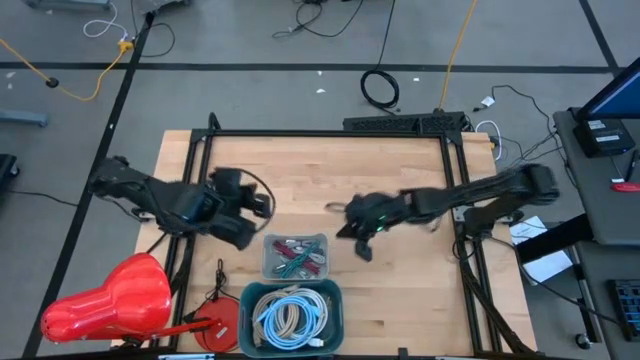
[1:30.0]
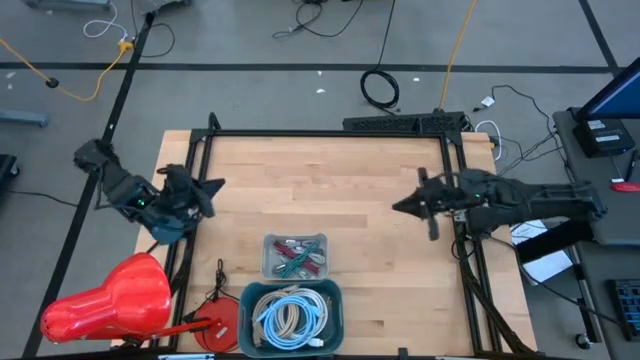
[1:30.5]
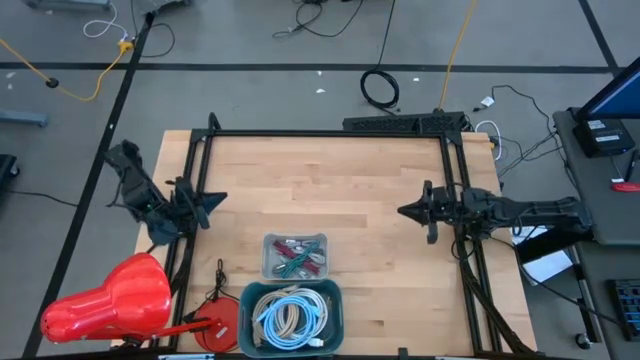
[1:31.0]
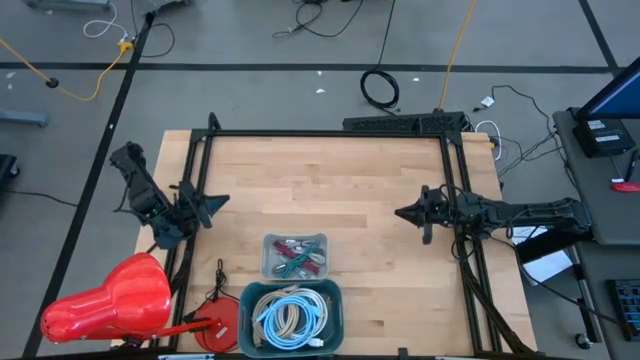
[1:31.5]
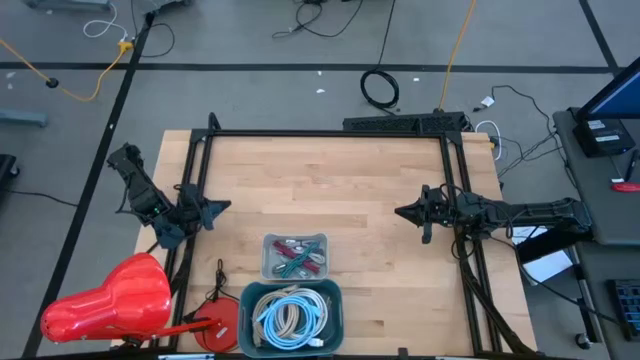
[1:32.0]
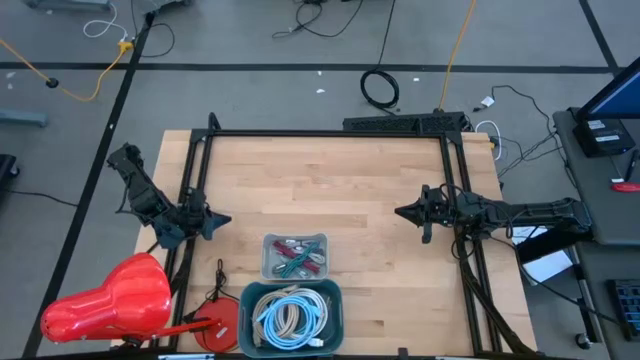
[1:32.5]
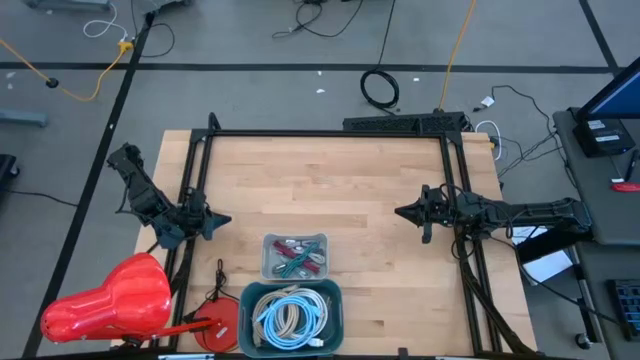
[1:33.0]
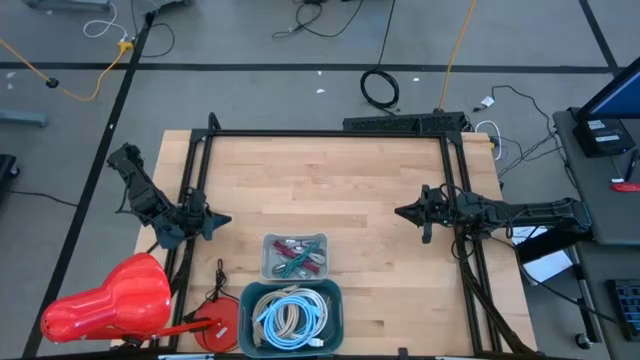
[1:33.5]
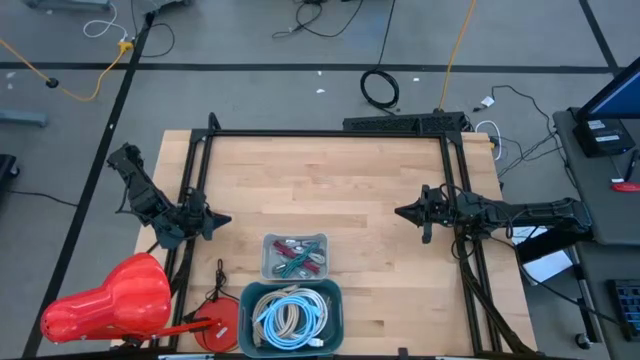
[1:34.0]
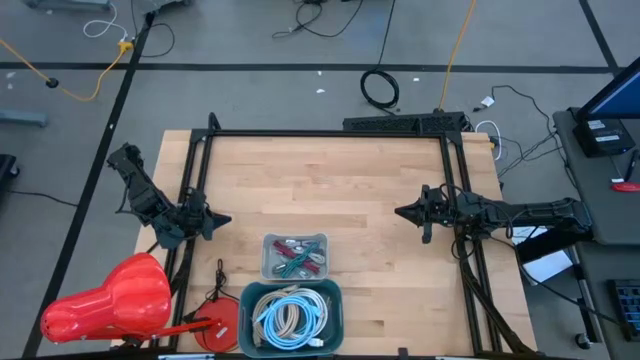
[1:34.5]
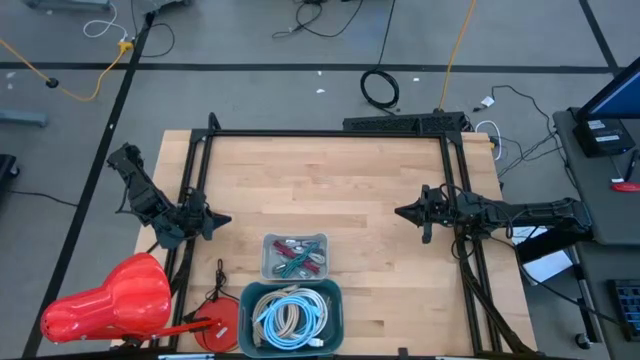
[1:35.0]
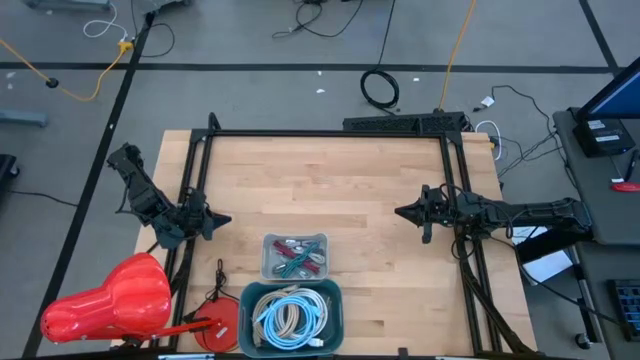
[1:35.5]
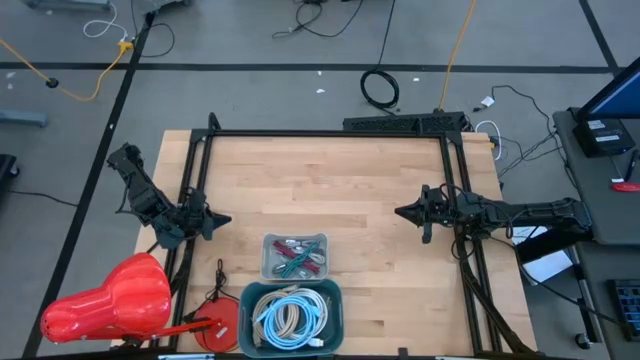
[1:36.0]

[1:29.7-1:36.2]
Task: Pick & Place USB Port
Return to Home Position

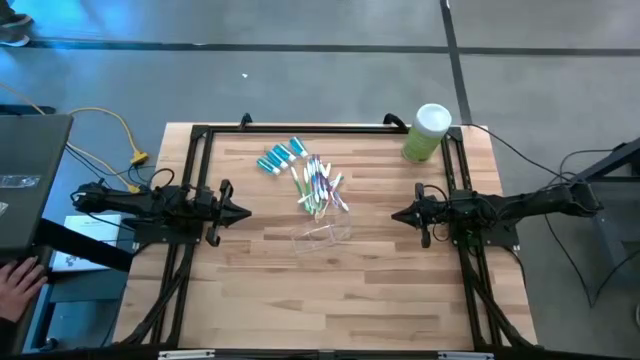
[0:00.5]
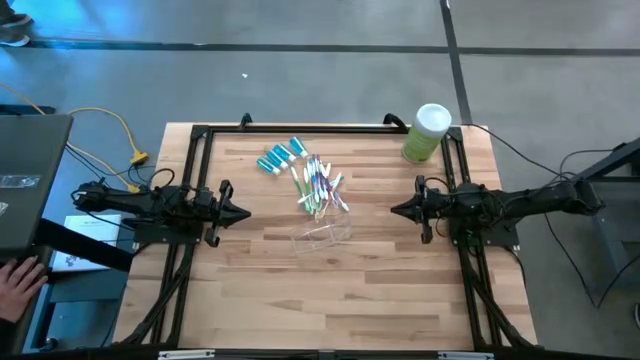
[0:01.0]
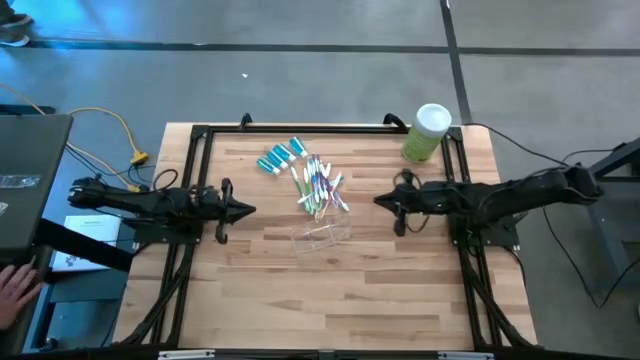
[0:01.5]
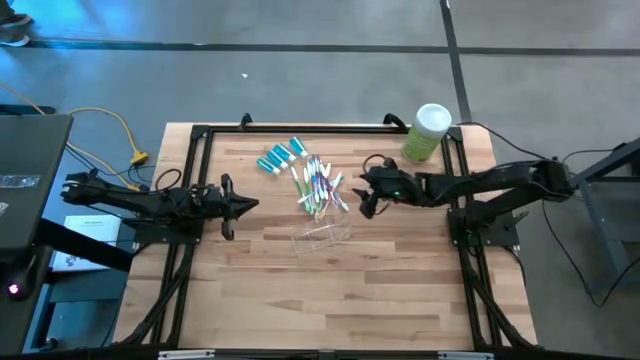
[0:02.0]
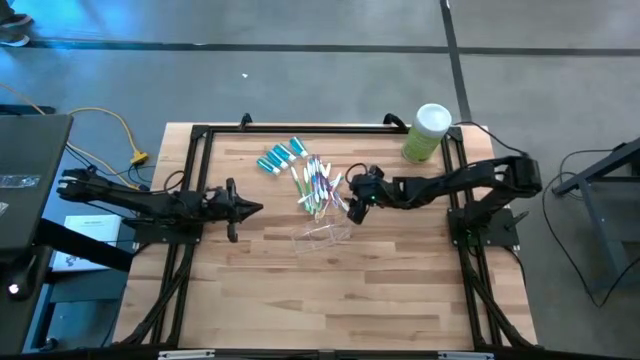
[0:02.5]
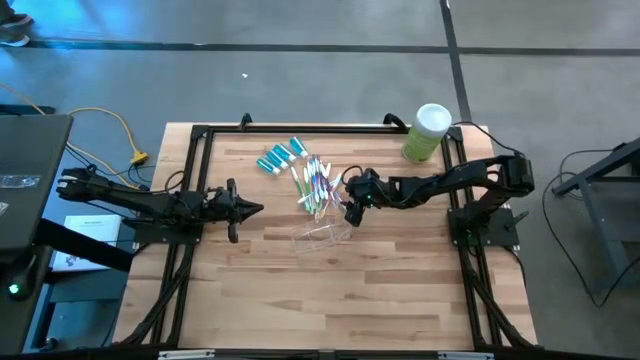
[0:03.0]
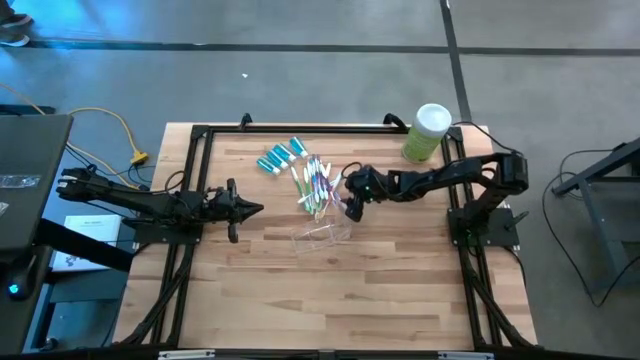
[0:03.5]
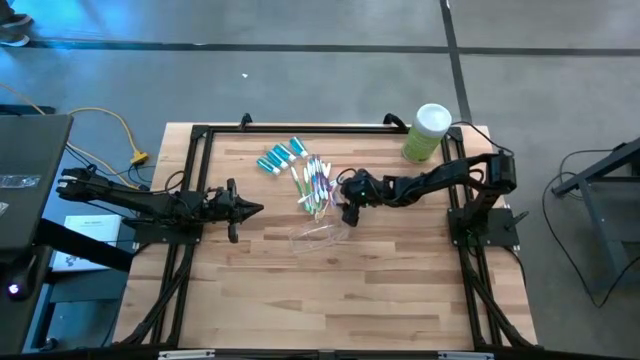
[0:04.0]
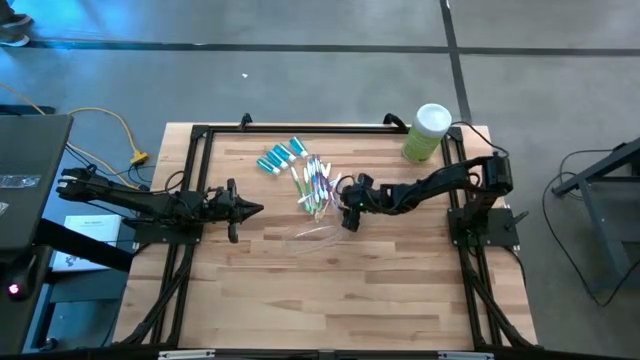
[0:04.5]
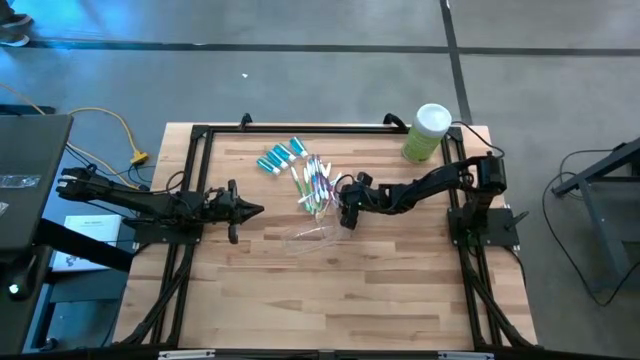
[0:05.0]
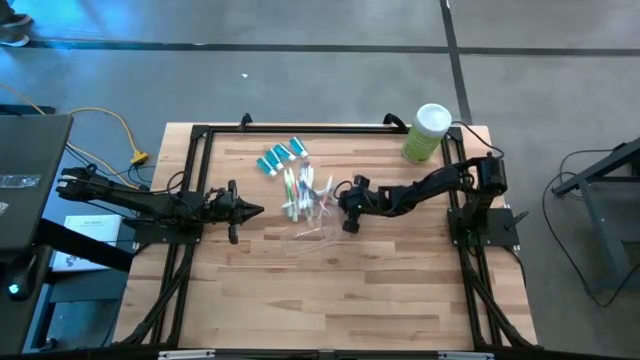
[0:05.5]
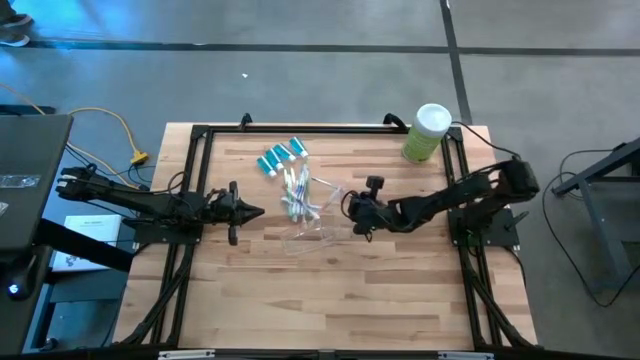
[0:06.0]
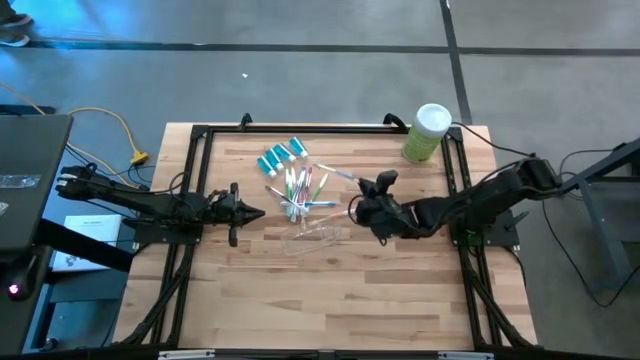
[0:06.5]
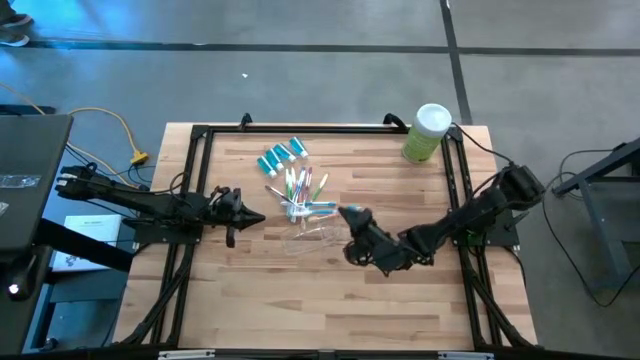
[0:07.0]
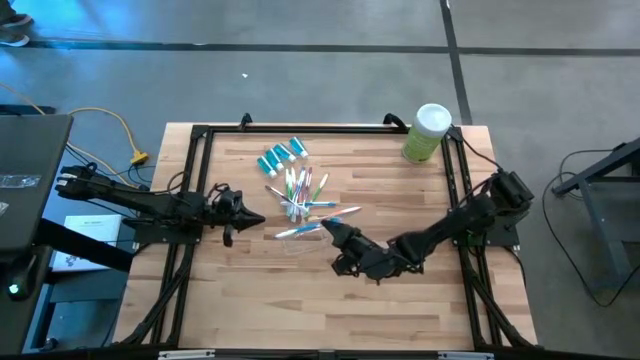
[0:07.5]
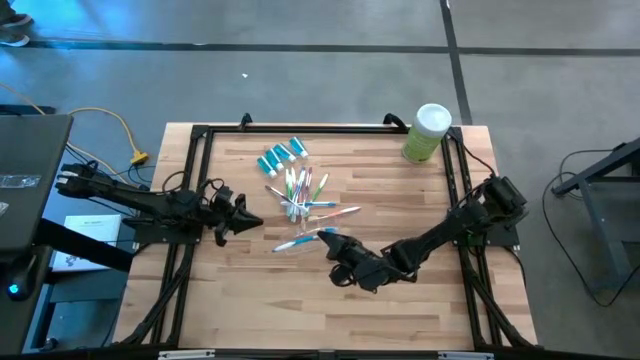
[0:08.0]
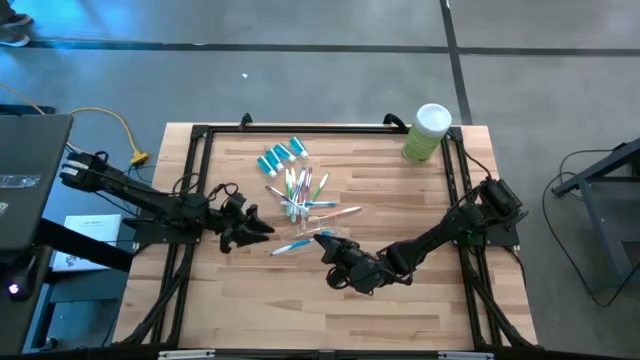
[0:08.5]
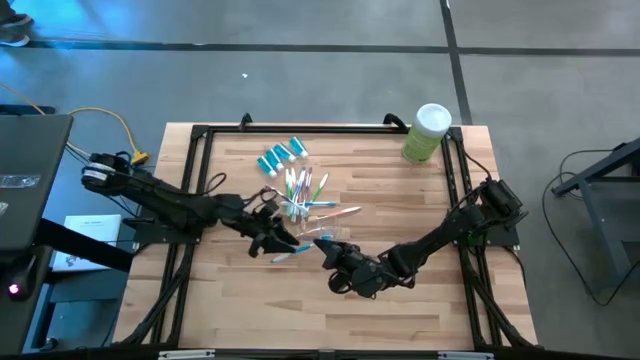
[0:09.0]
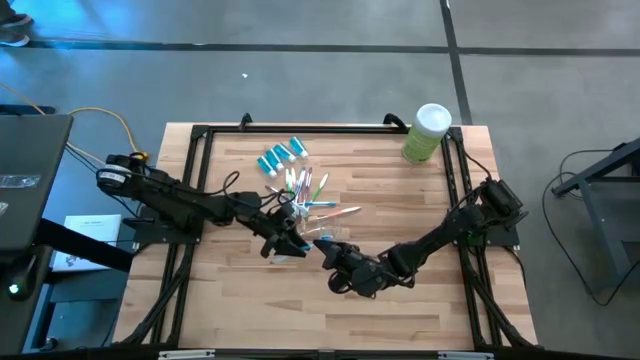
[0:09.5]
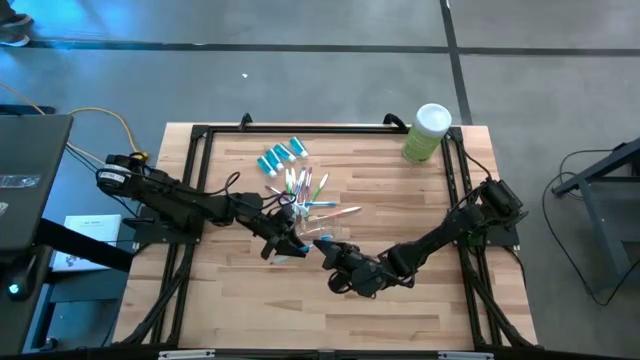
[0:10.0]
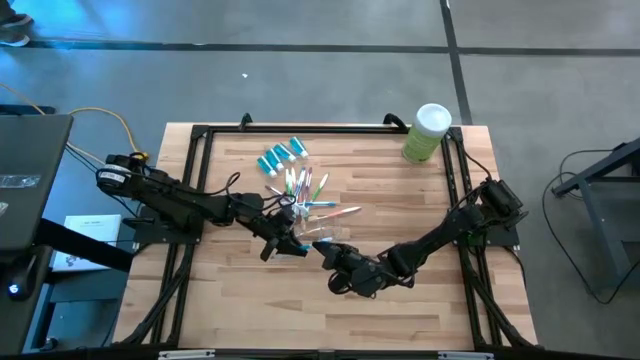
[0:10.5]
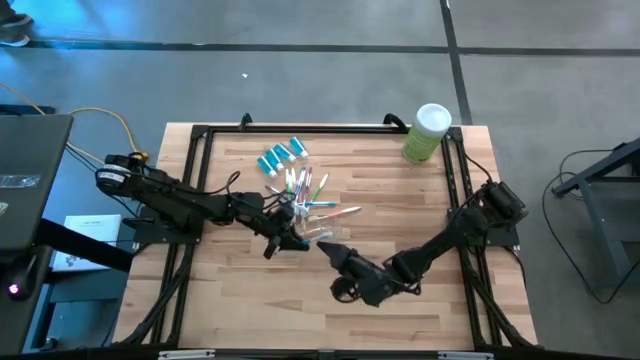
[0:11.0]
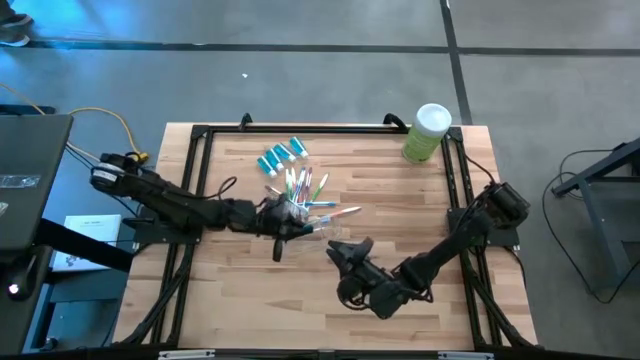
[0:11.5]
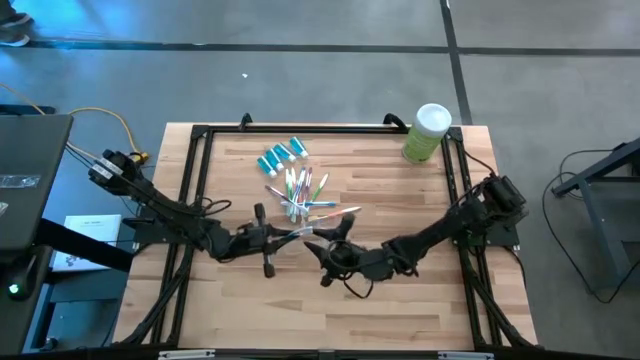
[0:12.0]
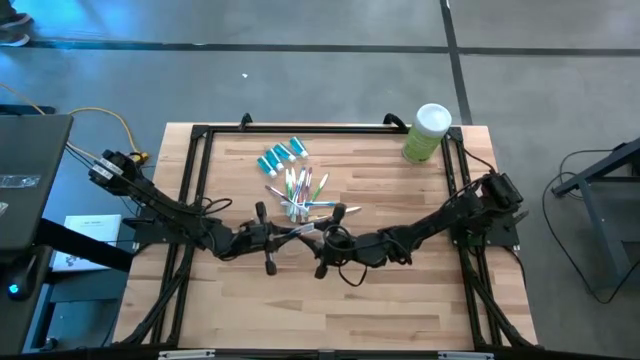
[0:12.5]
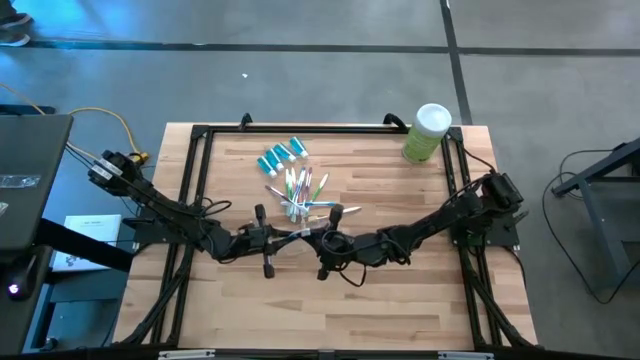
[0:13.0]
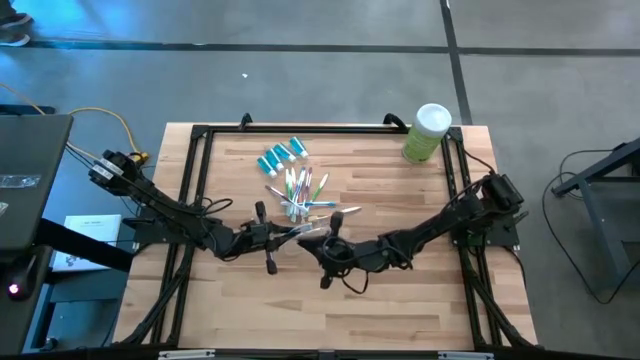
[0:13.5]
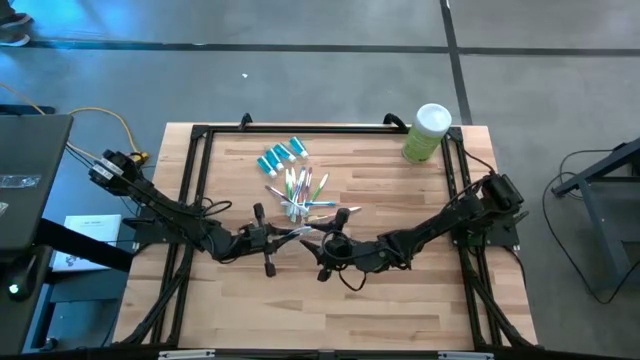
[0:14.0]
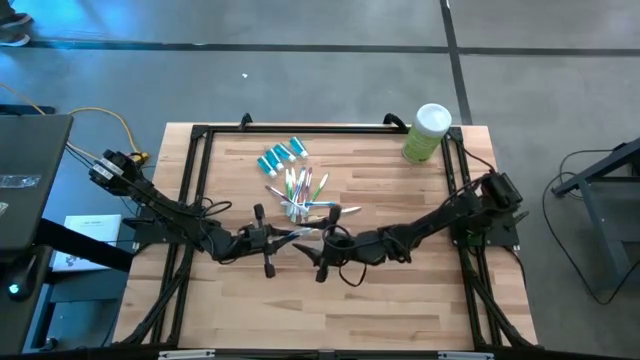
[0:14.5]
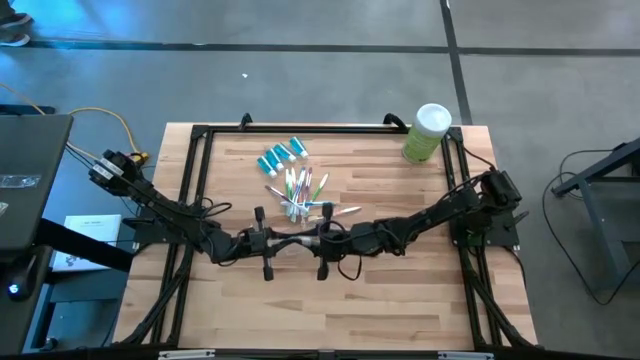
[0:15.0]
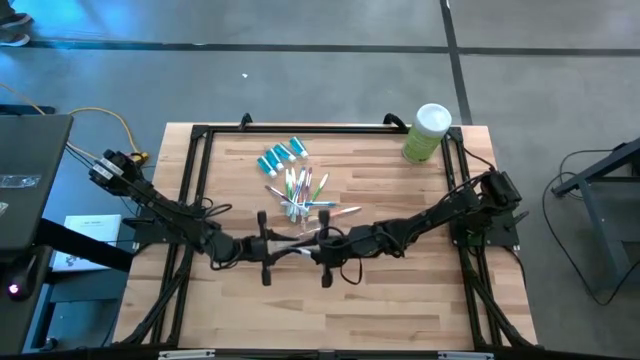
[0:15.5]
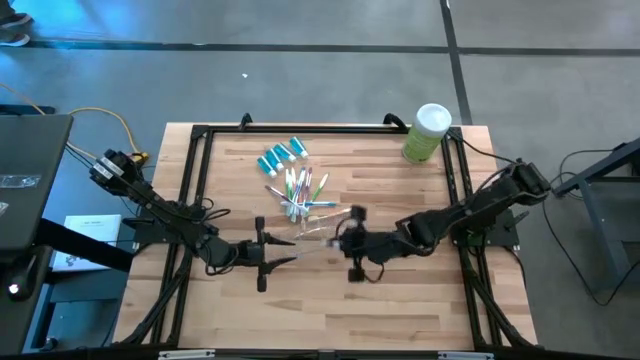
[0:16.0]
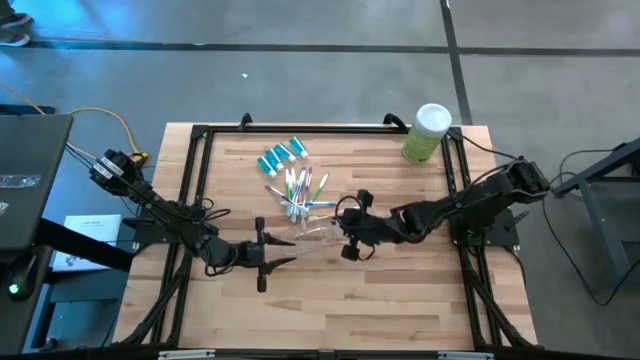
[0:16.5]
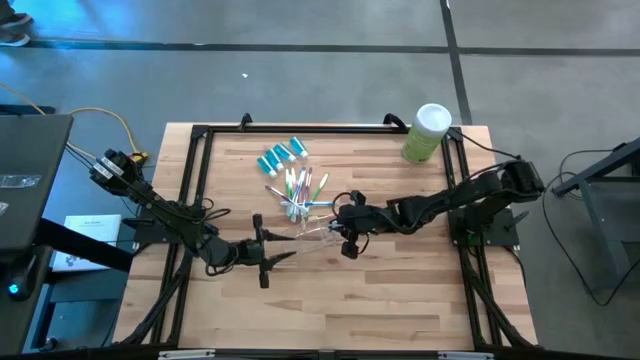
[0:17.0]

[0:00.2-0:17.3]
Task: Pick & Place toothbrushing station
Put the blue toothbrush into the transparent organizer
